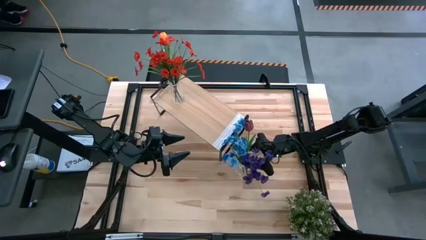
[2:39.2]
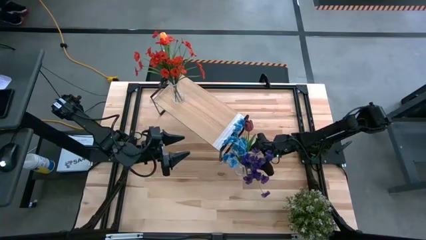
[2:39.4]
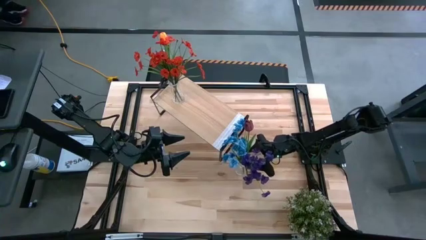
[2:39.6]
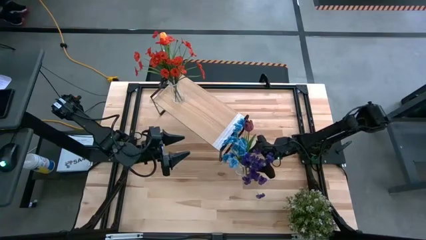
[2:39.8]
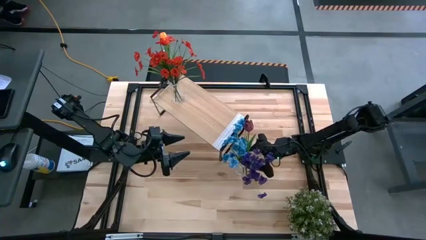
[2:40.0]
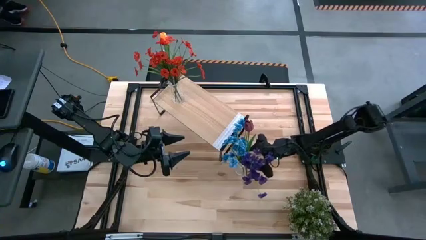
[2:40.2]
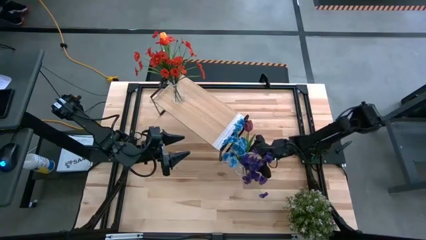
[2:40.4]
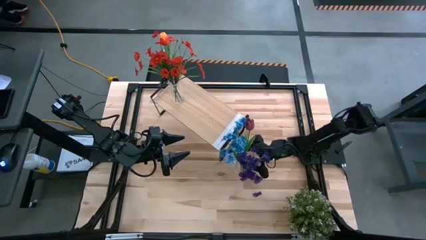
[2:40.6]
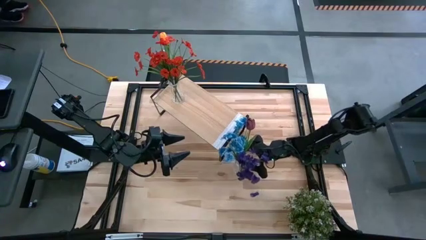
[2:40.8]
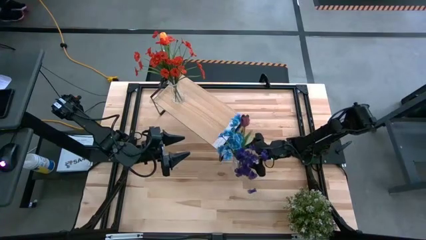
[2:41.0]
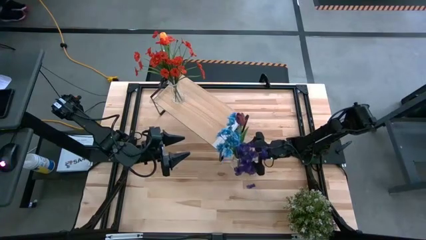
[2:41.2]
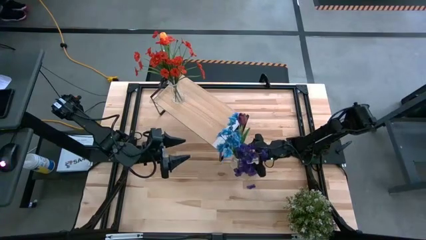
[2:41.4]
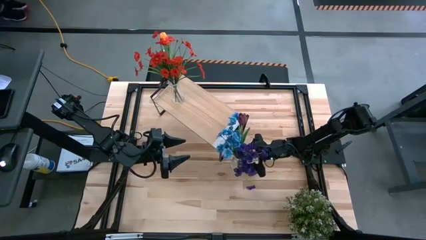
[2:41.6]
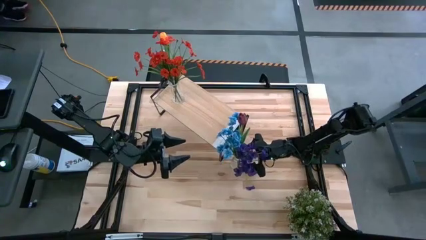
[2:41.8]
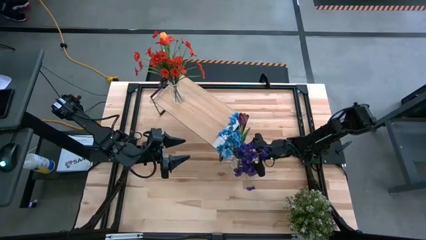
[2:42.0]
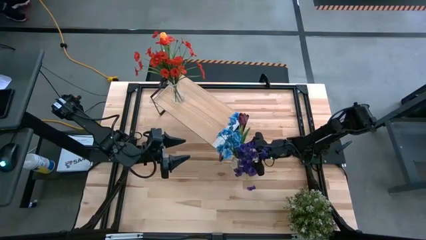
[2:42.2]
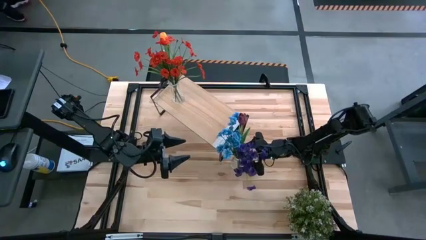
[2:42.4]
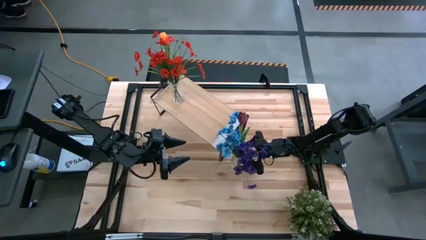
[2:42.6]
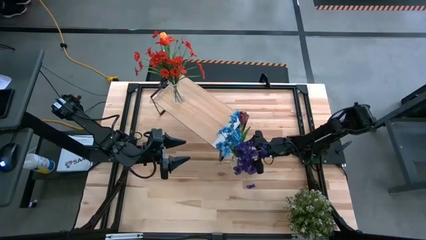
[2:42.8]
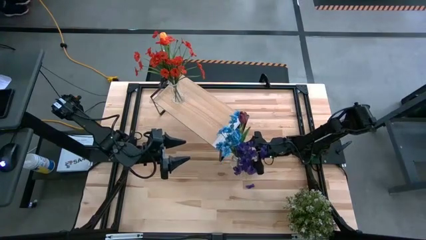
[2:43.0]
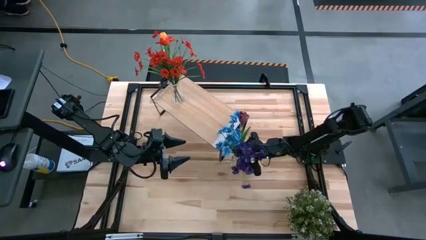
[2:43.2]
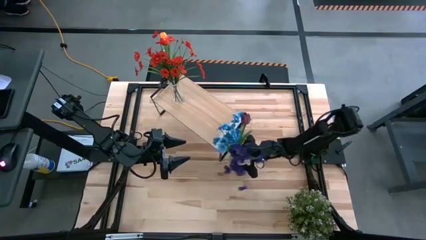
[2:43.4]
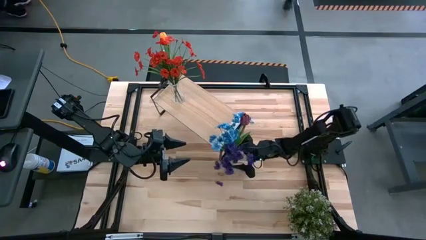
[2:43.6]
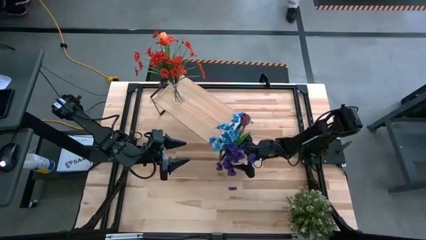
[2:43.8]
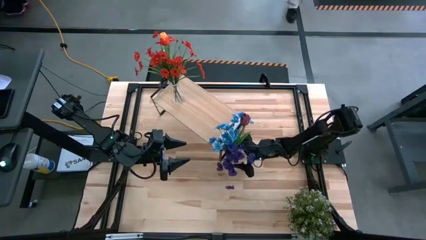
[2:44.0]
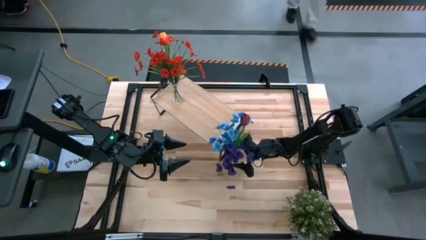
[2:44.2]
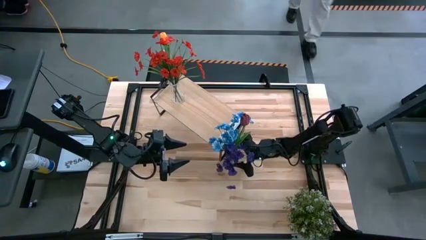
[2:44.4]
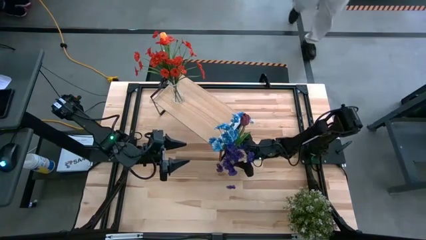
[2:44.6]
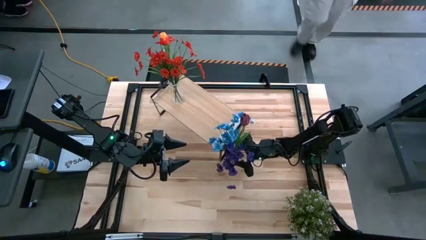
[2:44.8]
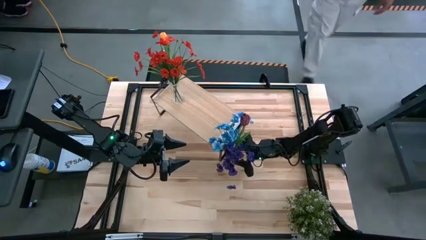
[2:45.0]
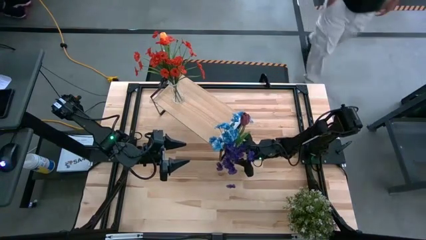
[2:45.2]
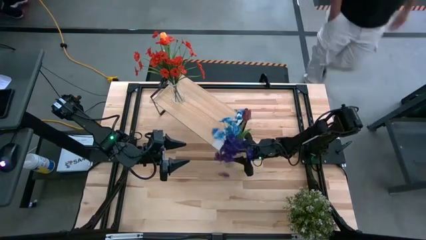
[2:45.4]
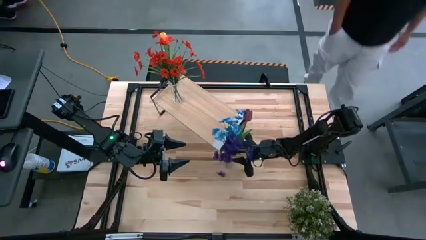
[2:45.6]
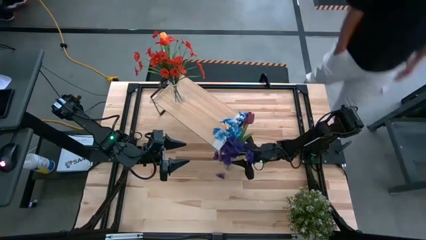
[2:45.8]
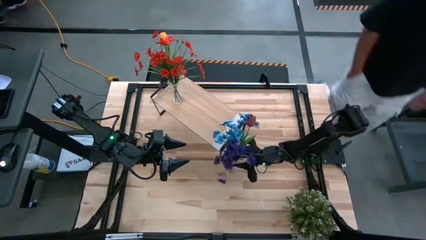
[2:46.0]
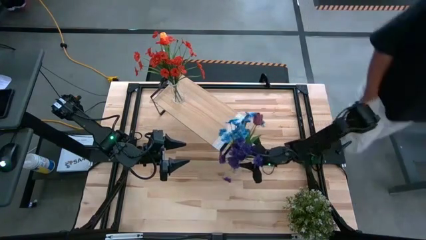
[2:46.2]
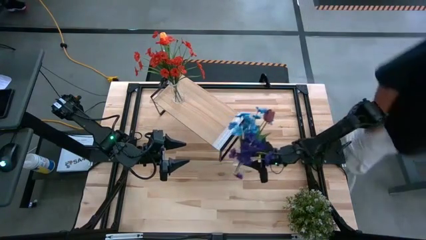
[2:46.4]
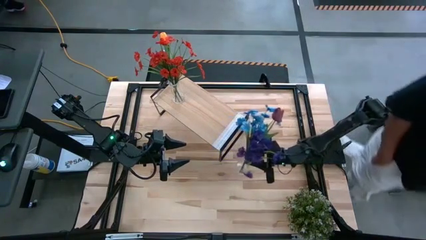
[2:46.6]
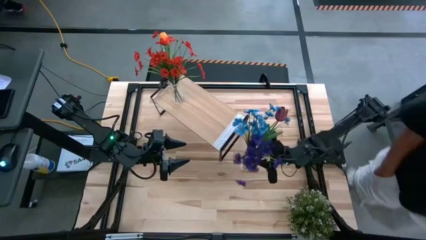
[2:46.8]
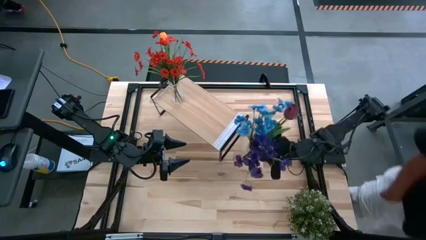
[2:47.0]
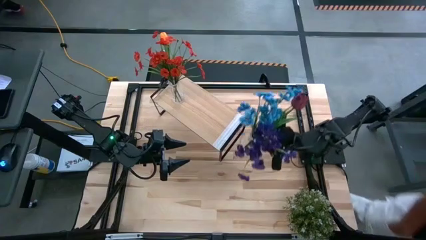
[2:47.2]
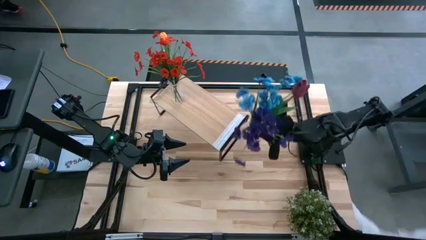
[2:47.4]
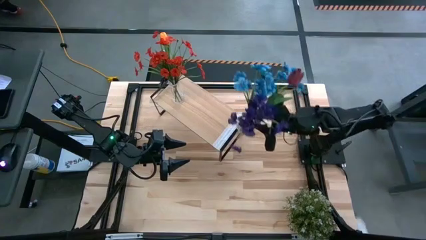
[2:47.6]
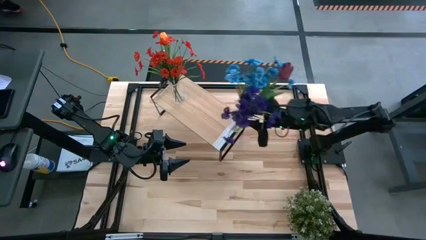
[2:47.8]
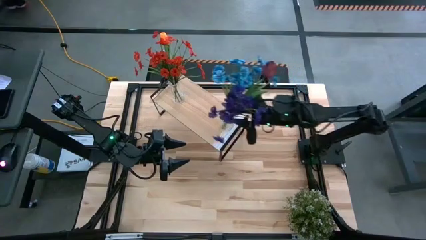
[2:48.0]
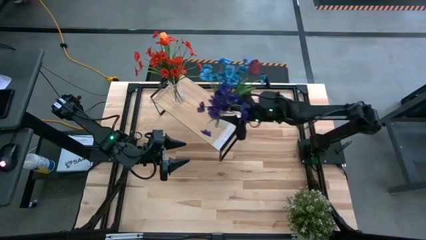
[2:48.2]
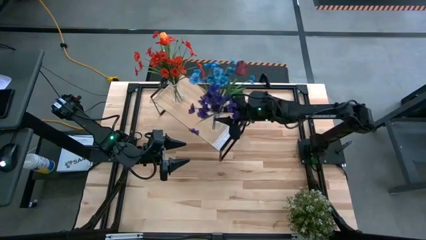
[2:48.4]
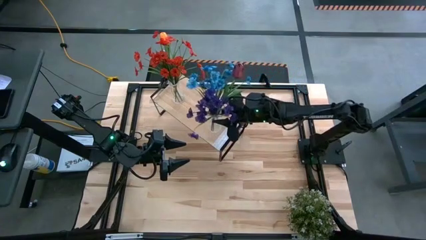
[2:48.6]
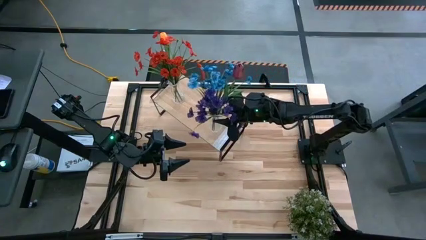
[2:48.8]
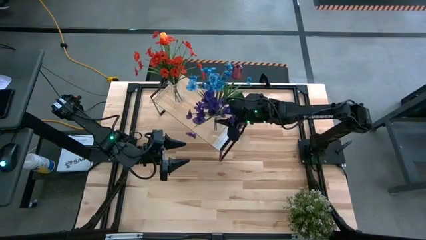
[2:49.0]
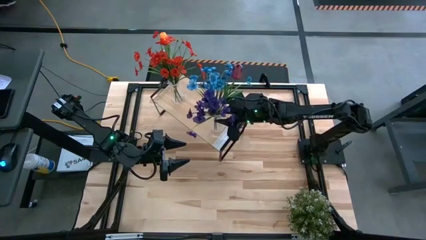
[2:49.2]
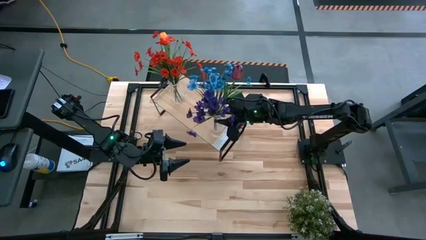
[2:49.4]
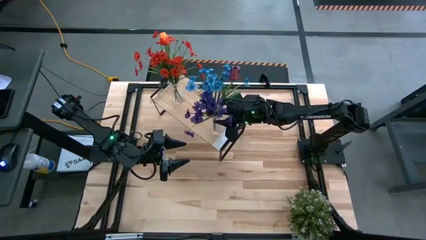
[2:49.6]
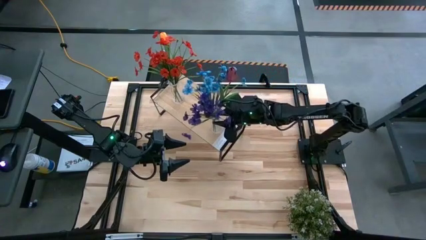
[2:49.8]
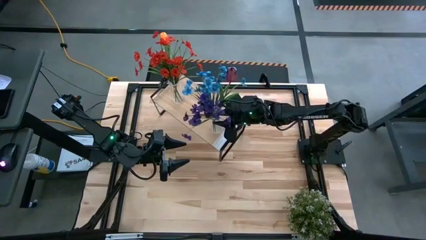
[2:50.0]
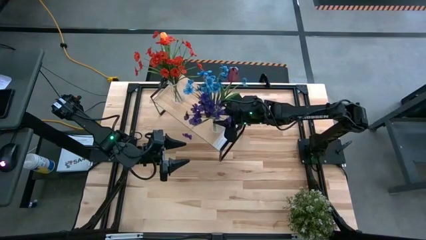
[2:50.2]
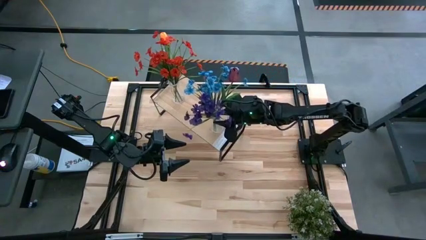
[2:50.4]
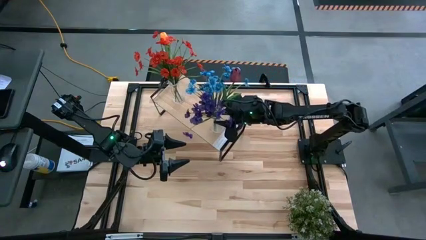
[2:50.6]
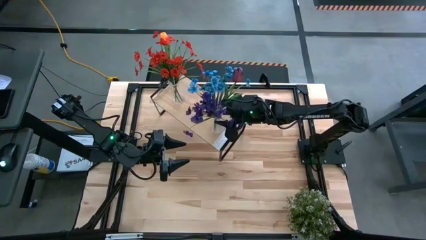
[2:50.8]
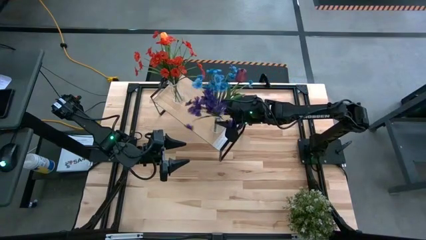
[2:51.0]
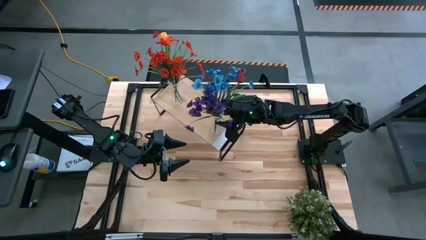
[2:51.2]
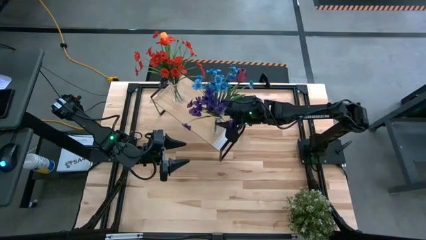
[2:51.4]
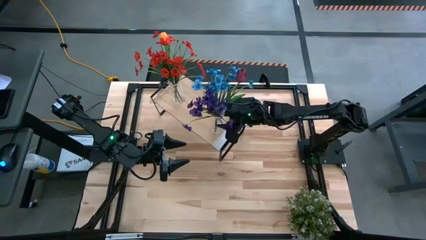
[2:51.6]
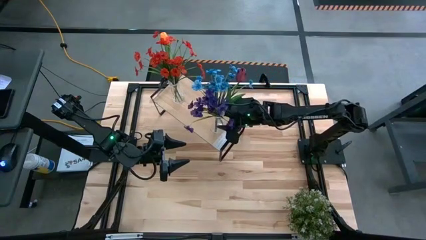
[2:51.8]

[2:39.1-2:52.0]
Task: Pick and place flowers into a vace then onto a shelf
Put the transparent flower vase on the shelf

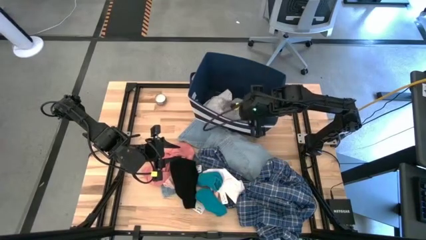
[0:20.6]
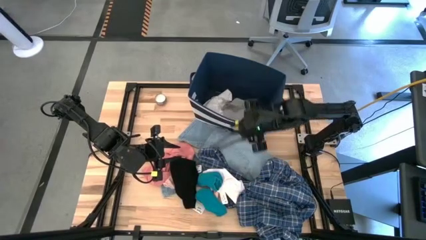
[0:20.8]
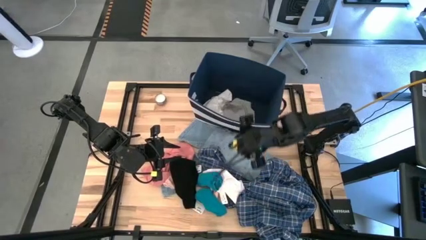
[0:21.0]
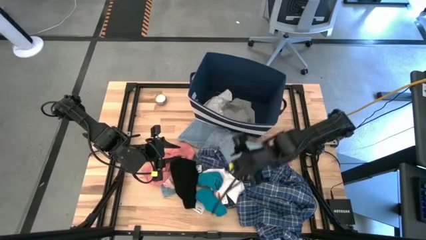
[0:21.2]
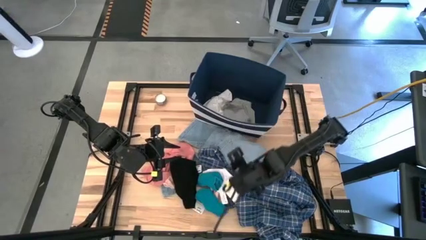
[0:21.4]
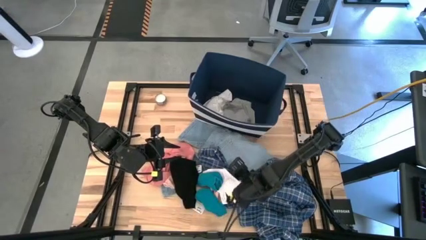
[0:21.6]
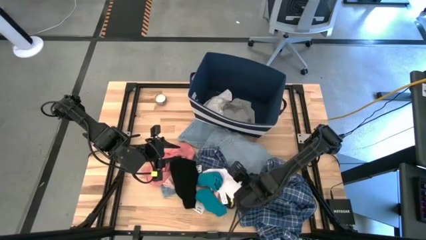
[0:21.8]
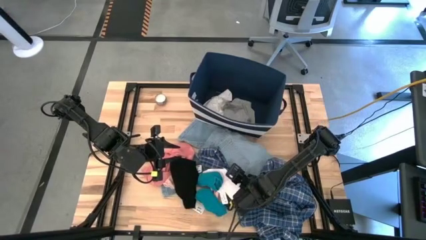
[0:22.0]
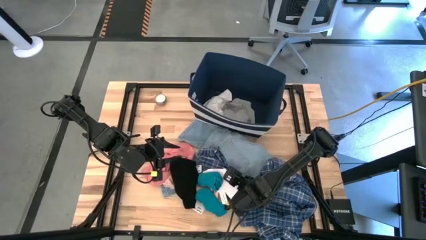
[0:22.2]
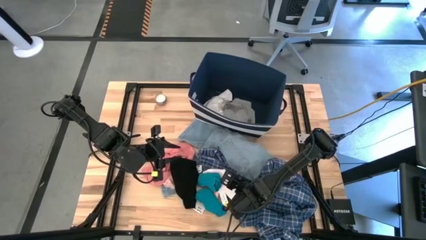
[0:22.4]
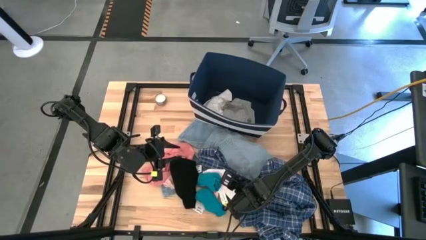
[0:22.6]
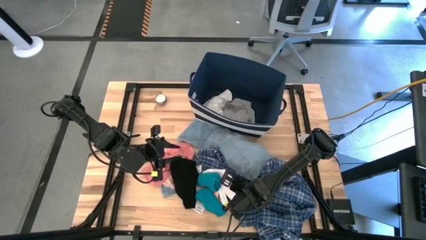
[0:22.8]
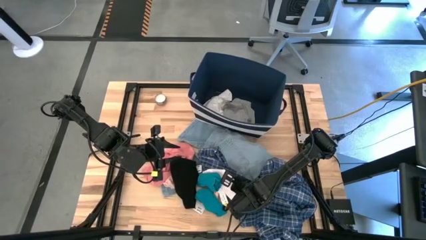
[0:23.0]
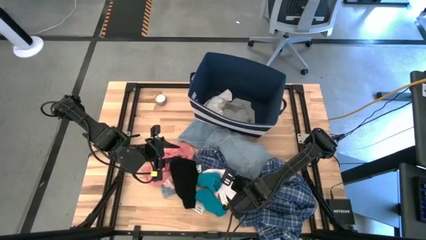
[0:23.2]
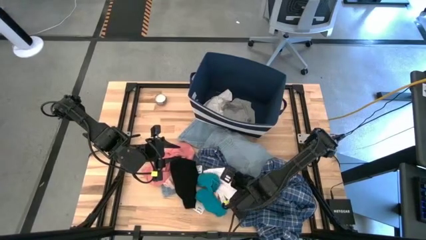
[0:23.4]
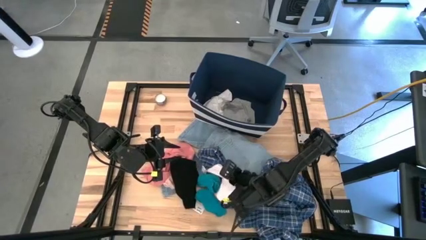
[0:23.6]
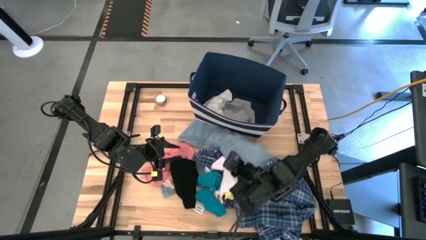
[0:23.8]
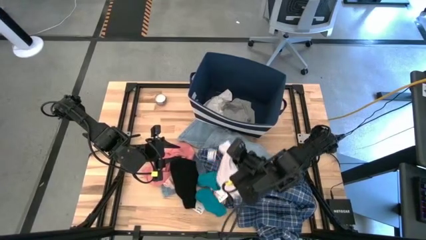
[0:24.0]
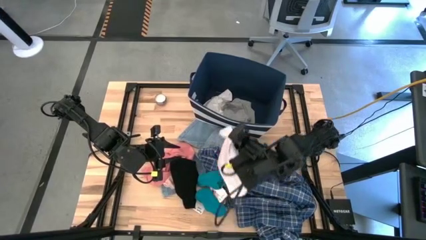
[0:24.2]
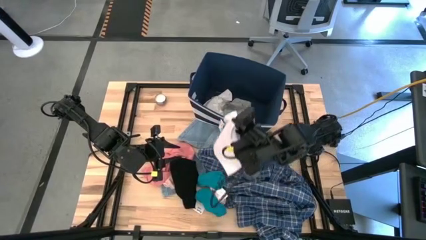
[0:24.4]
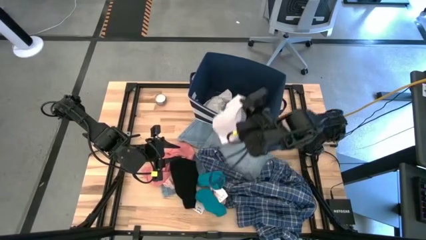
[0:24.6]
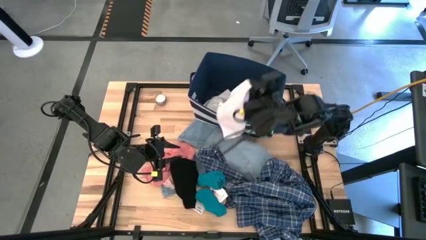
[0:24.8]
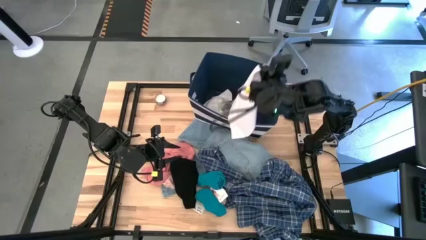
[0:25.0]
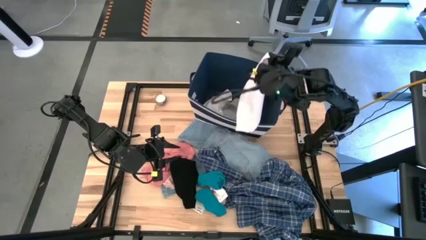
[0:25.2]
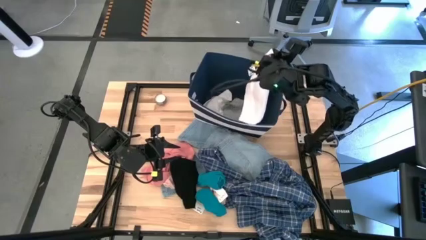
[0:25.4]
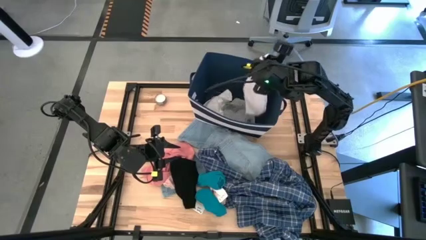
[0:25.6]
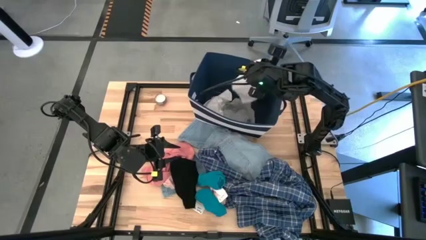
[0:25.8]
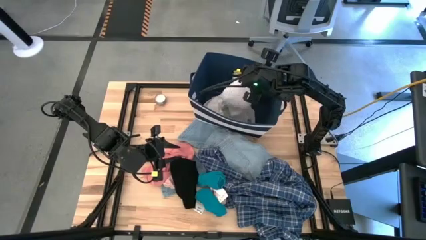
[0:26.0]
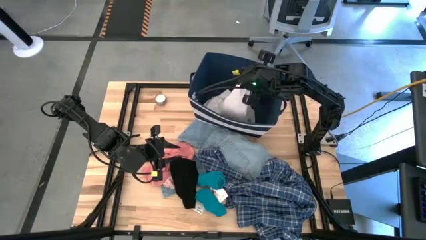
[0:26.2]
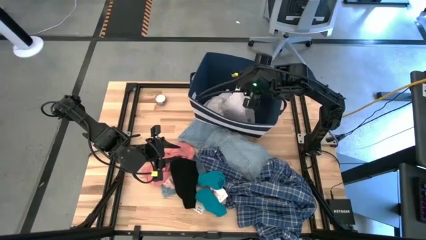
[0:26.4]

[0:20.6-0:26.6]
Task: Sort clothes
Put the white shirt into the blue laundry organizer
